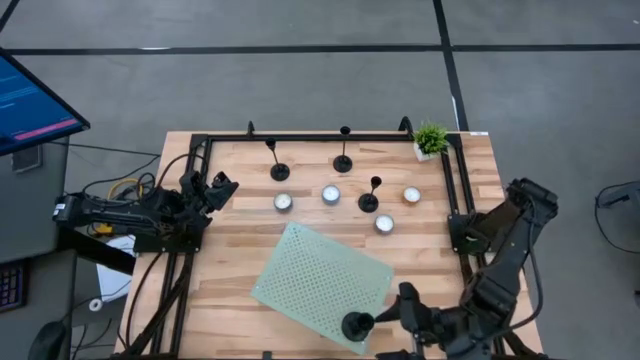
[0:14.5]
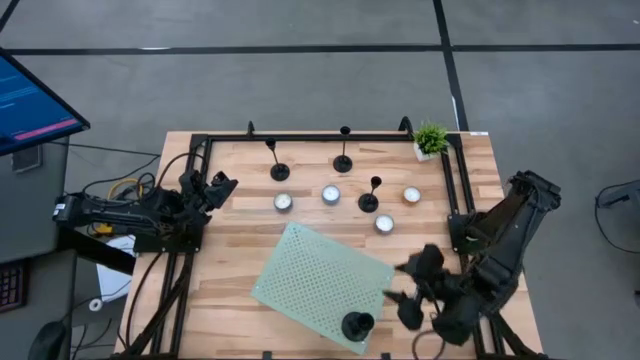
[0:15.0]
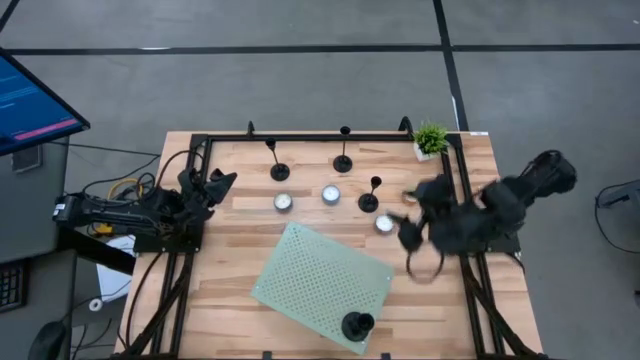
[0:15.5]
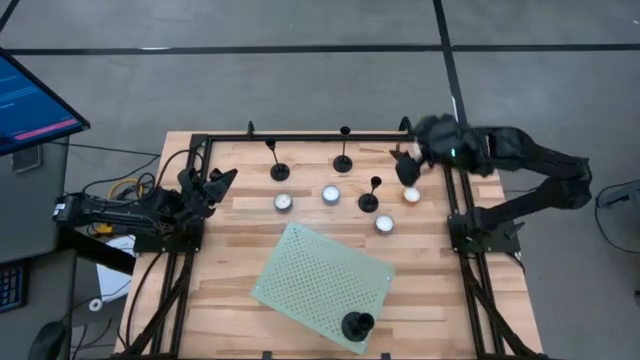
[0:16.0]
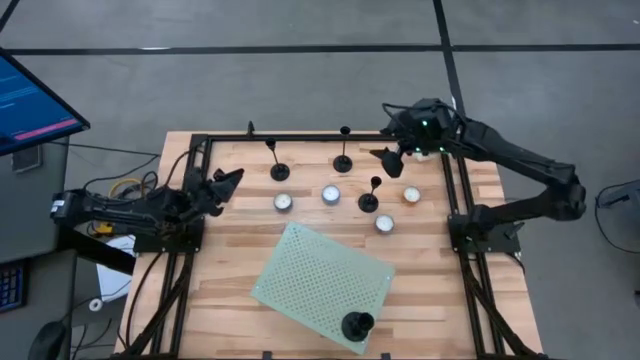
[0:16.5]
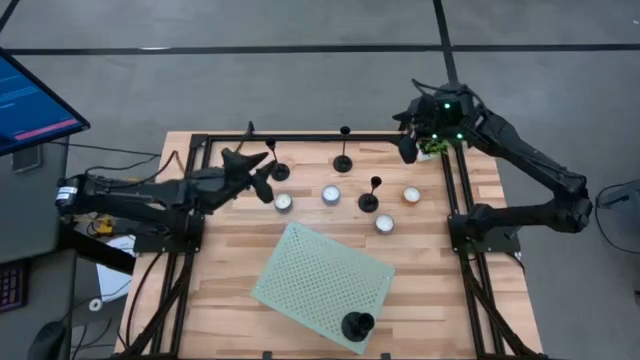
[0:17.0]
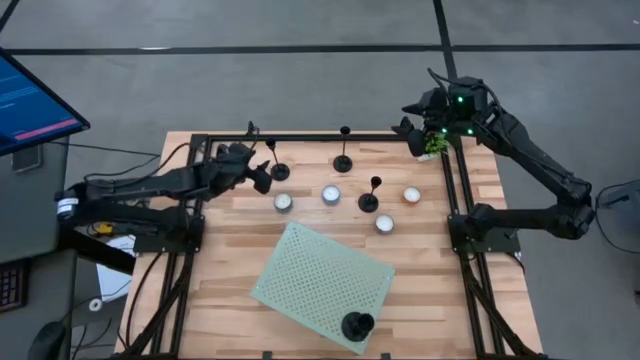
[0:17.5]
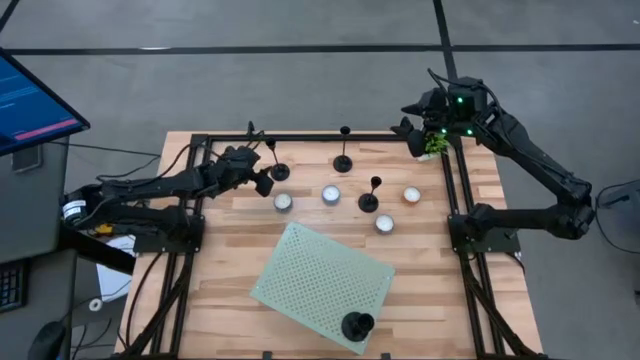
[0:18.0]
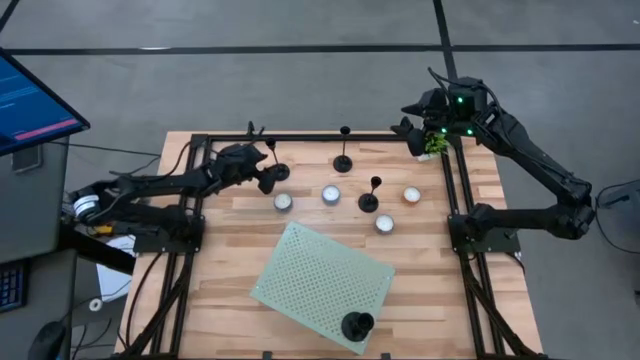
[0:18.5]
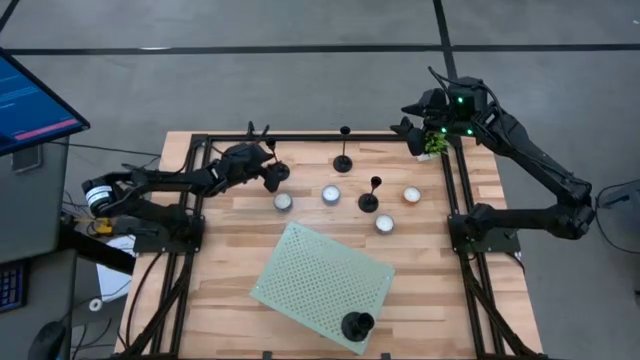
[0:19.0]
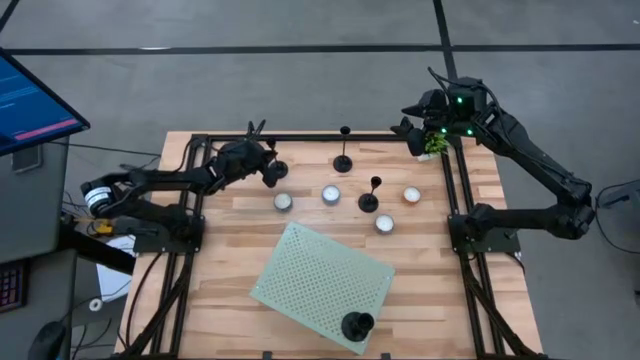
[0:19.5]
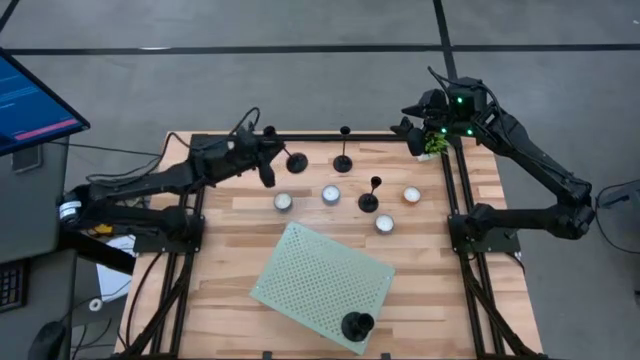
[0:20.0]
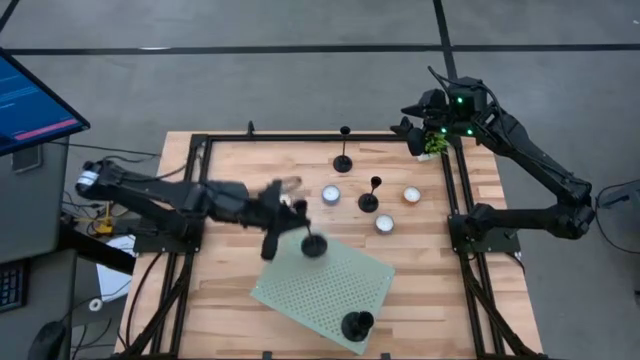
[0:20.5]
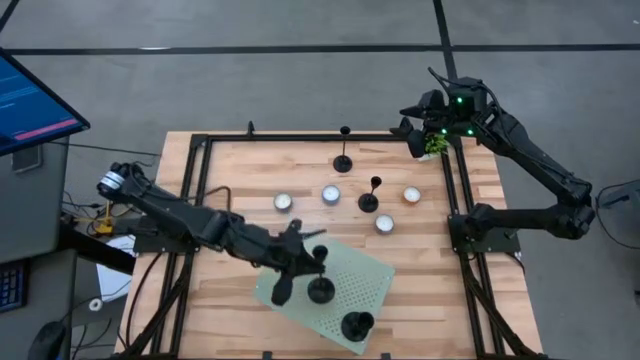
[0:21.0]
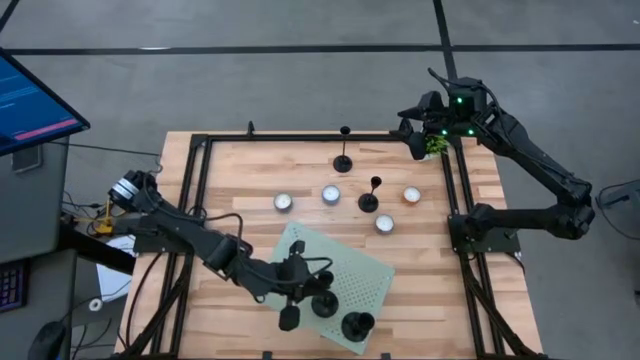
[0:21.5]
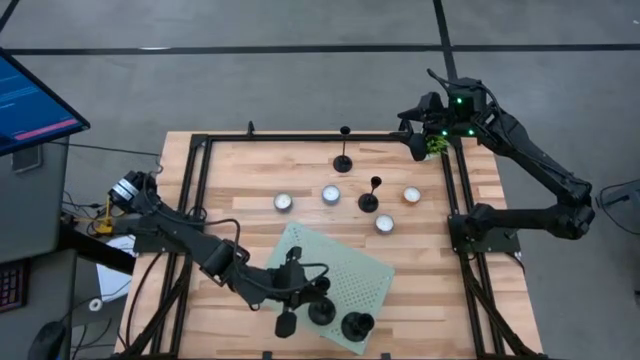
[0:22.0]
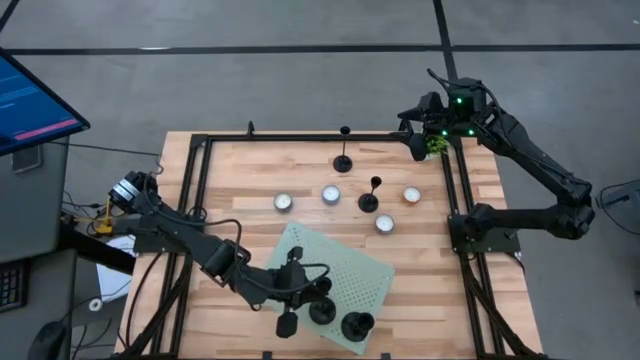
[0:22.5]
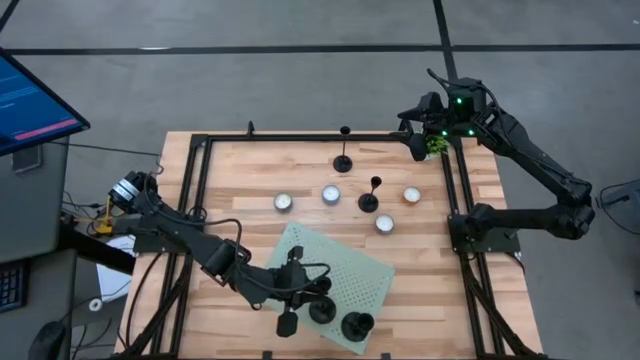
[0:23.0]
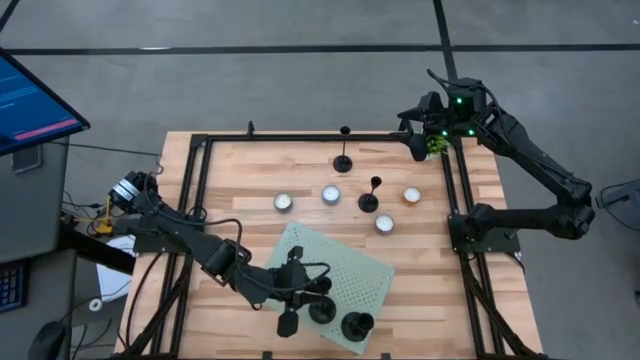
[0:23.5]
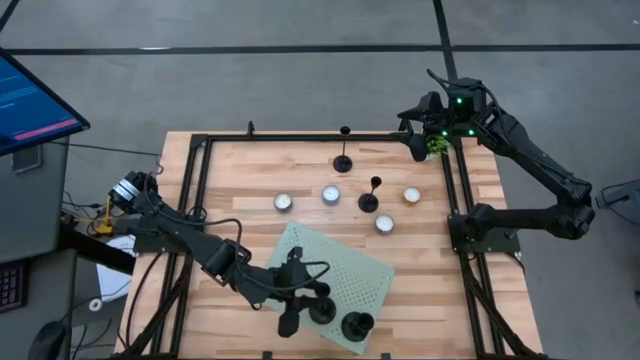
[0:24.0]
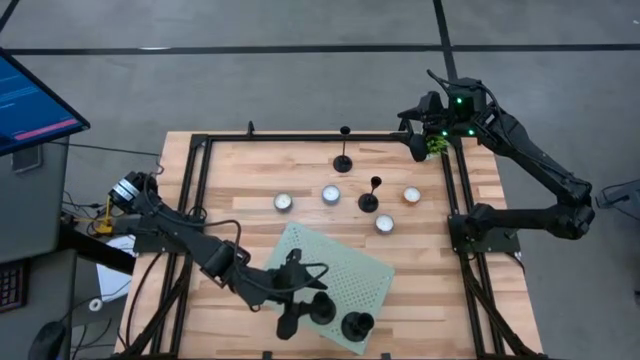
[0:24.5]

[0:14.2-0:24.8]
Task: Pick & Place candle stick holders
Put the candle holder on the shelf

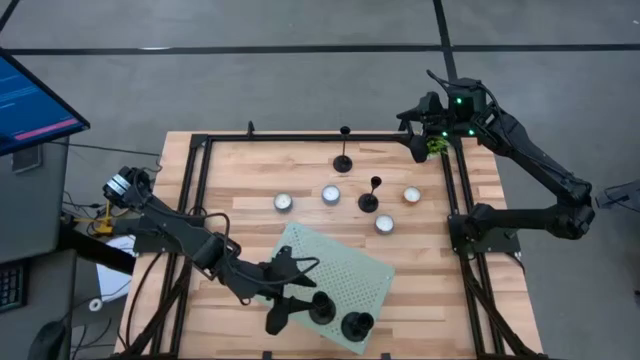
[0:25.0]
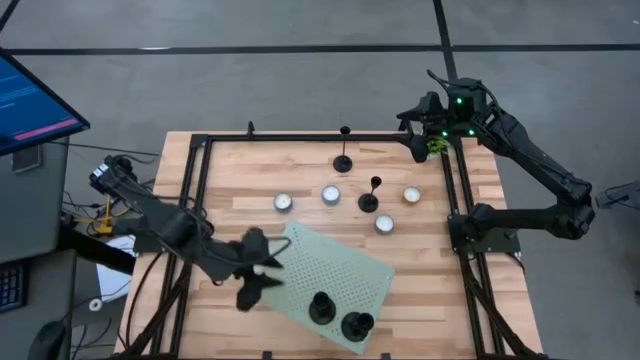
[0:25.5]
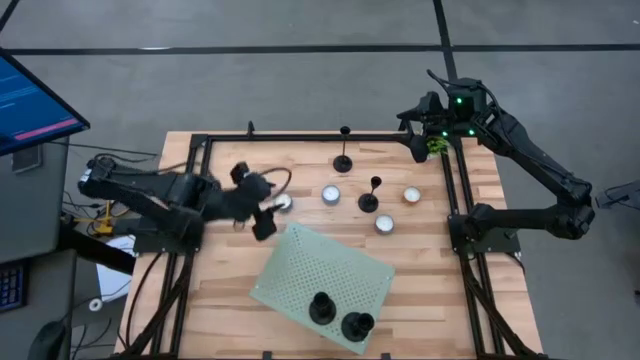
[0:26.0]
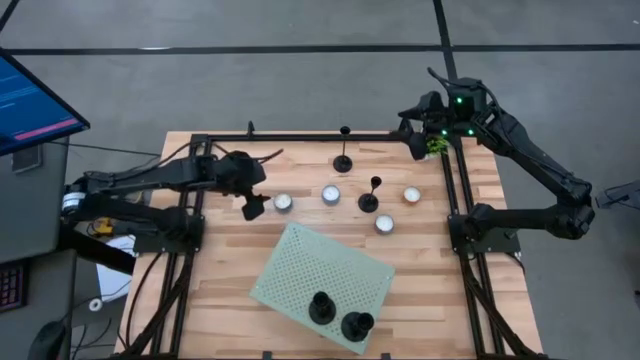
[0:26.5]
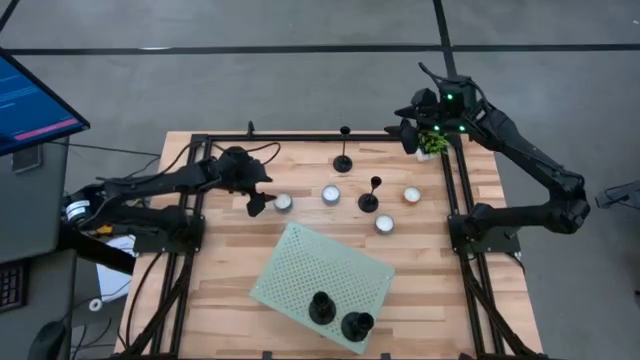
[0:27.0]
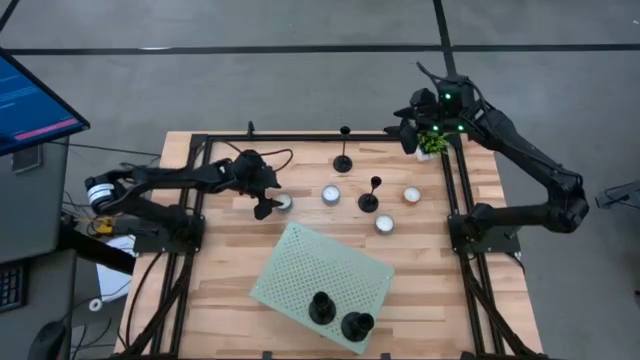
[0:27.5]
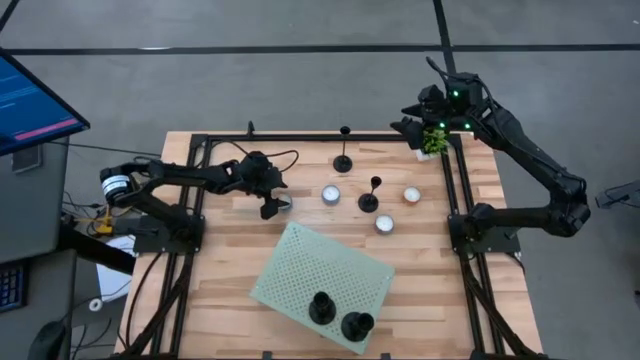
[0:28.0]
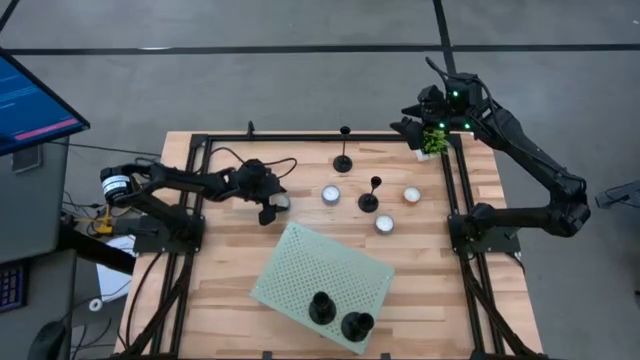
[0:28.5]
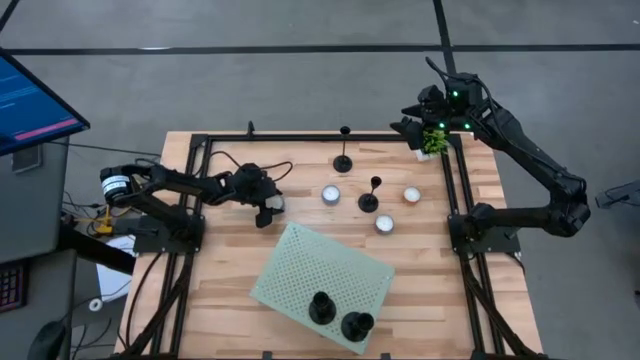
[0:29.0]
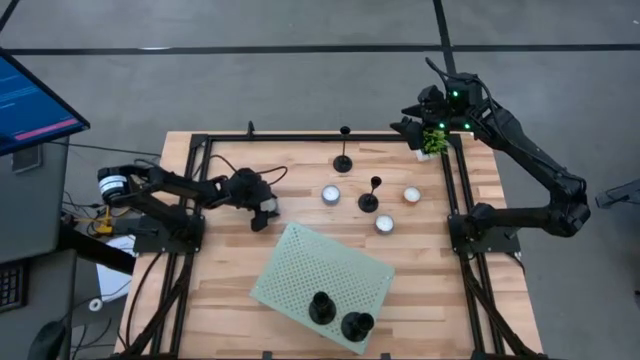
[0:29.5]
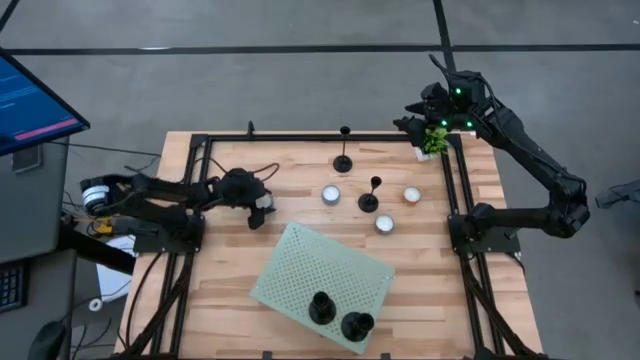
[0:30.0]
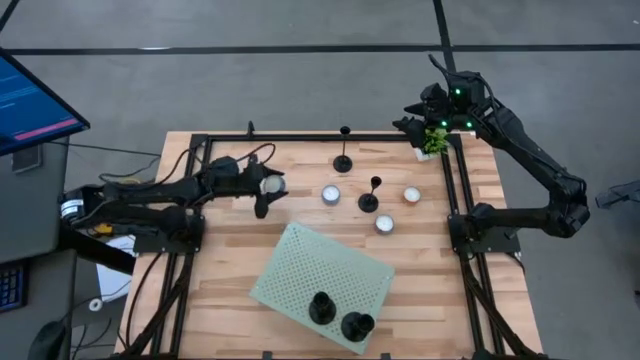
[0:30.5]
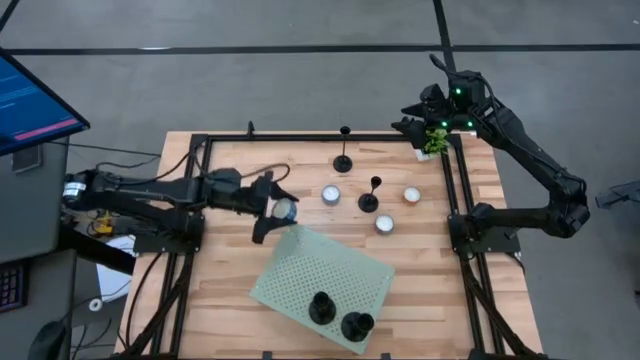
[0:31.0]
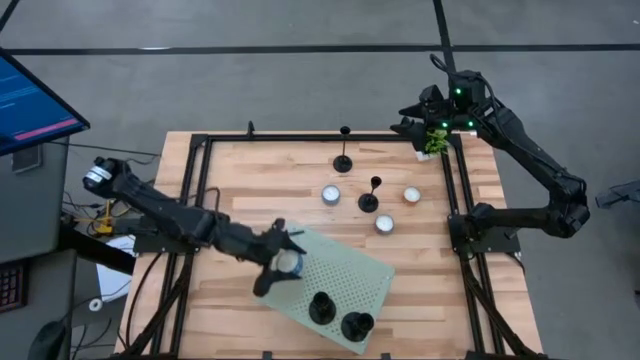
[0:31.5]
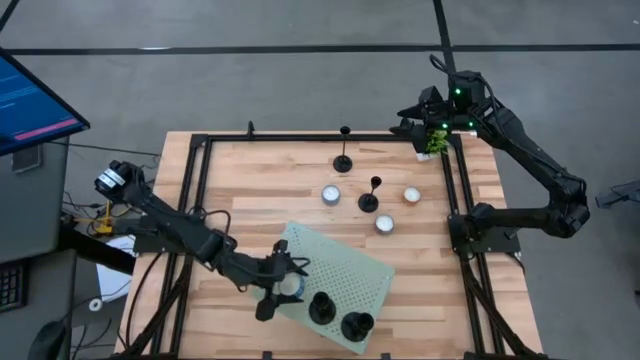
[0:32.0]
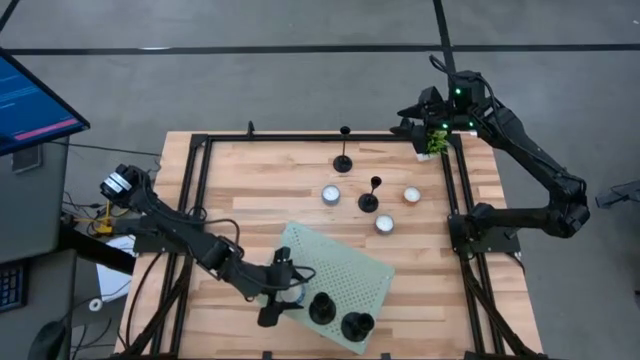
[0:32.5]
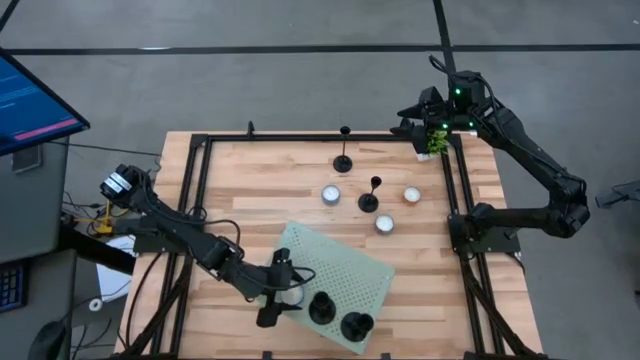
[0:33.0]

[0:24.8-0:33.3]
Put the blue patterned scented candle on the shelf

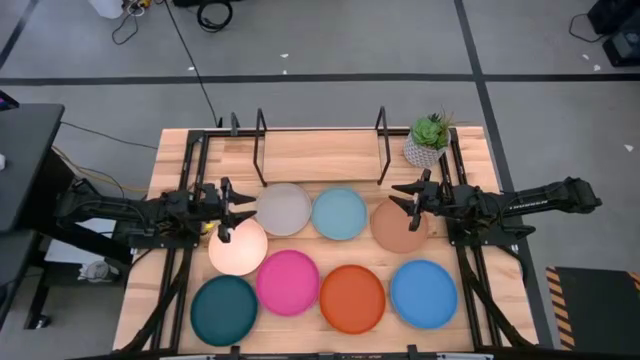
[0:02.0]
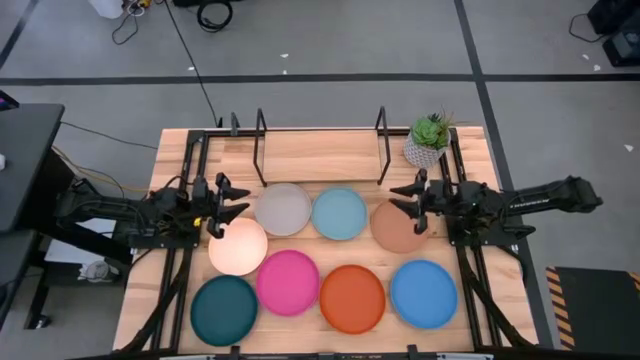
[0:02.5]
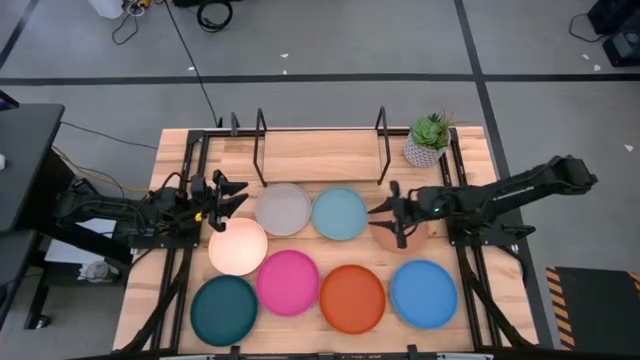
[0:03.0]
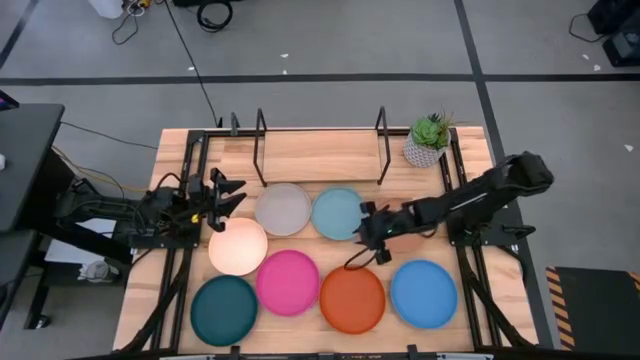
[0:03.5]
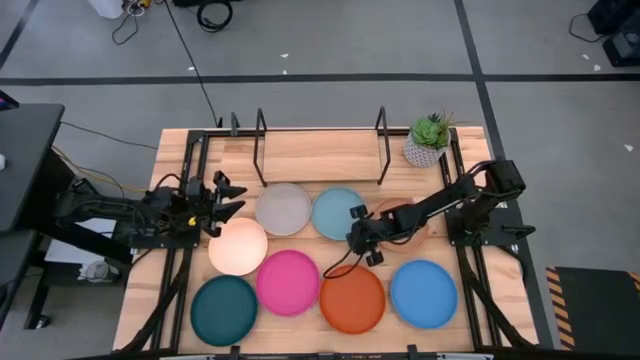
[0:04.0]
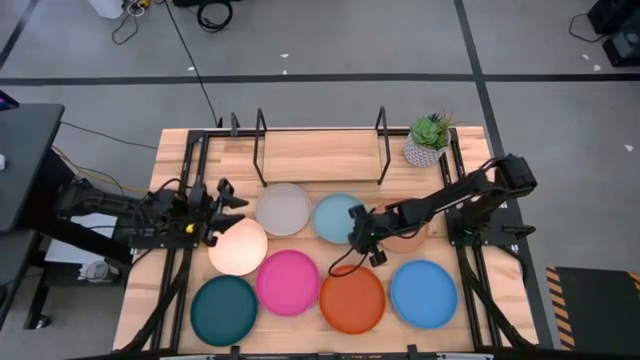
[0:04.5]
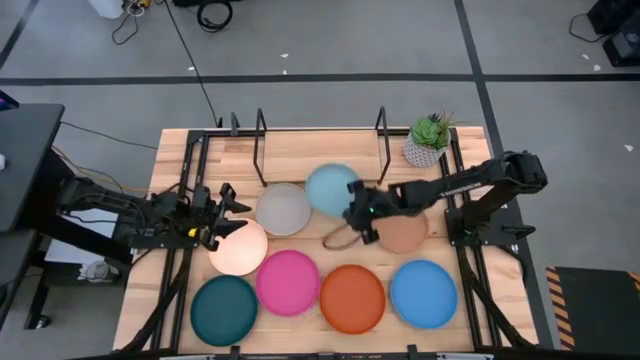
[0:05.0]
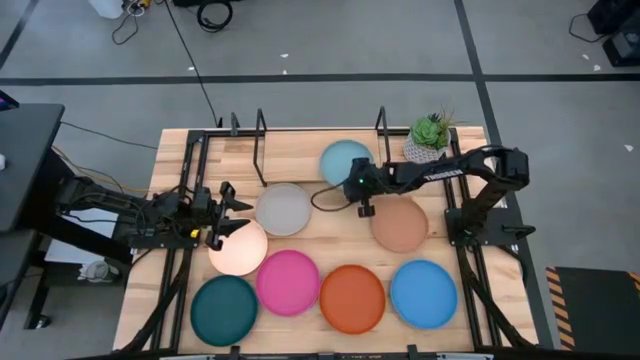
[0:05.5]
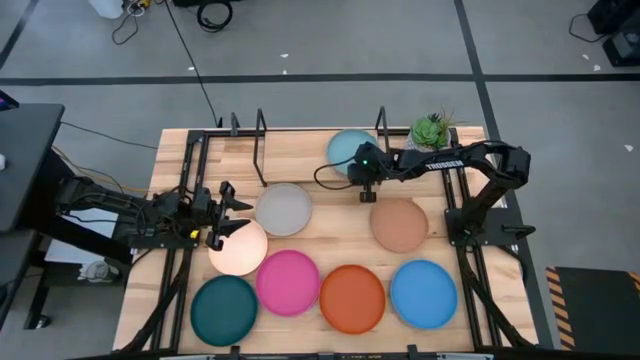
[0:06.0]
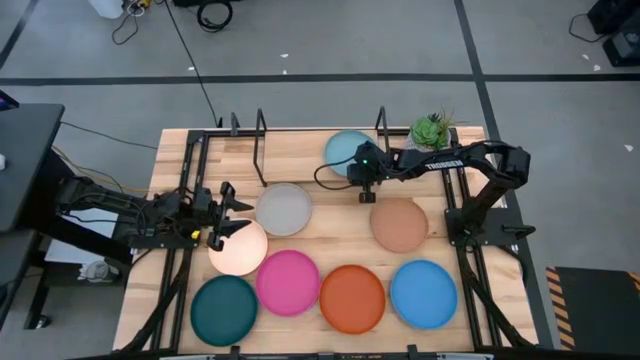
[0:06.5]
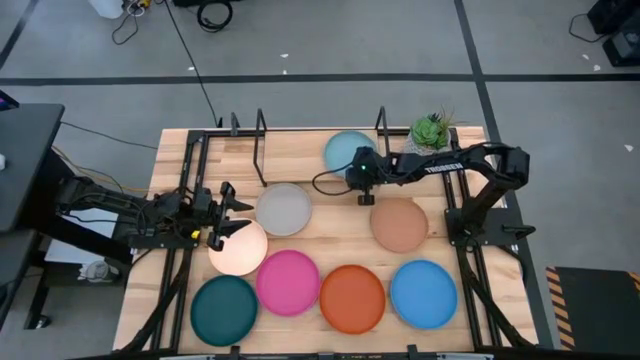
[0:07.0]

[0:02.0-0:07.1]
Task: Place and stack plates onto a shelf
Put the light blue plate on the shelf
